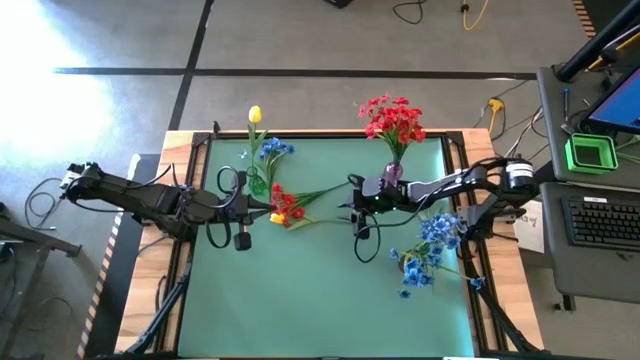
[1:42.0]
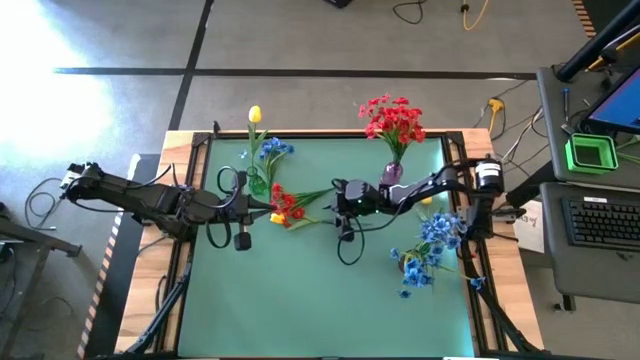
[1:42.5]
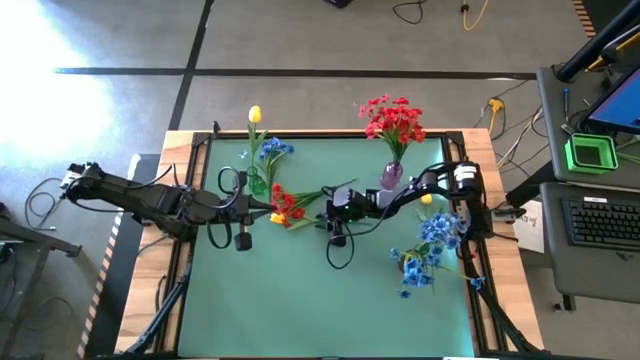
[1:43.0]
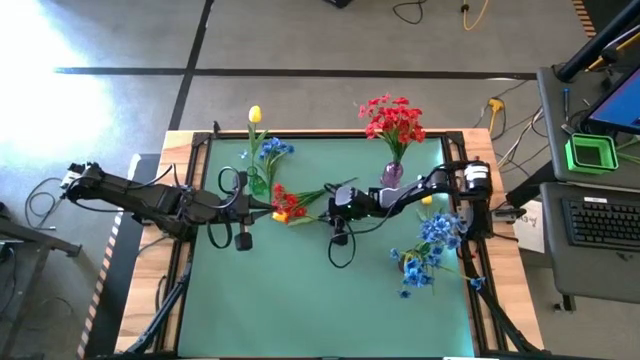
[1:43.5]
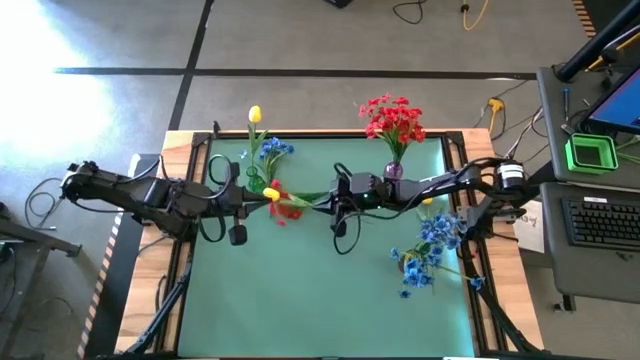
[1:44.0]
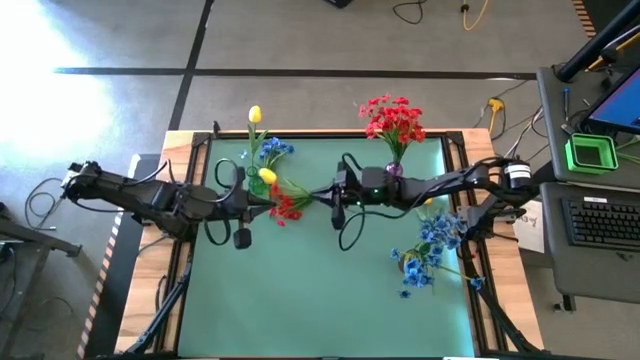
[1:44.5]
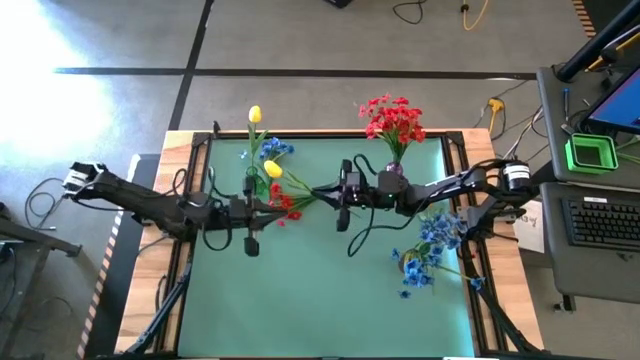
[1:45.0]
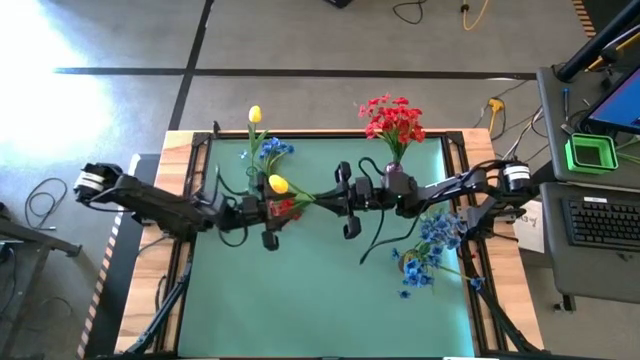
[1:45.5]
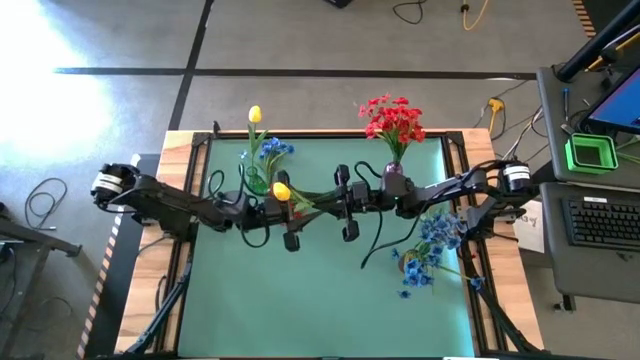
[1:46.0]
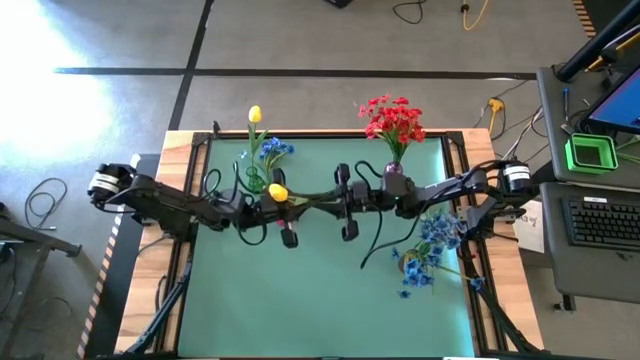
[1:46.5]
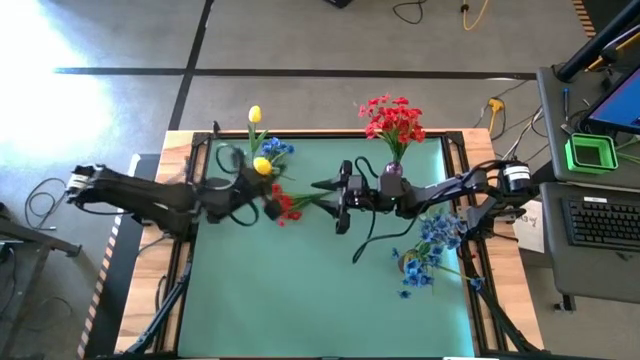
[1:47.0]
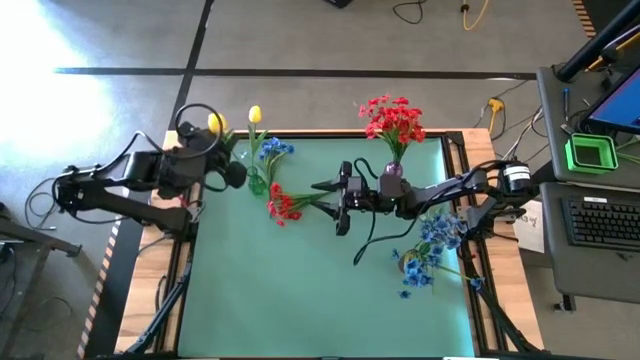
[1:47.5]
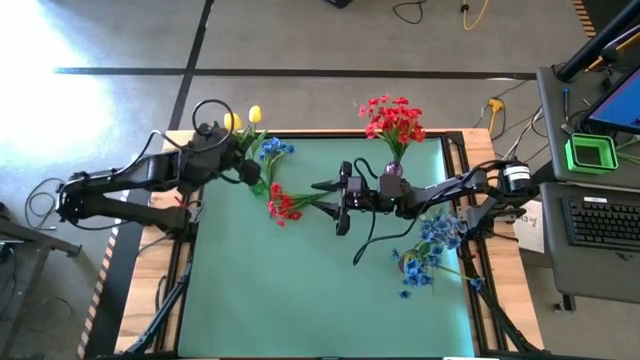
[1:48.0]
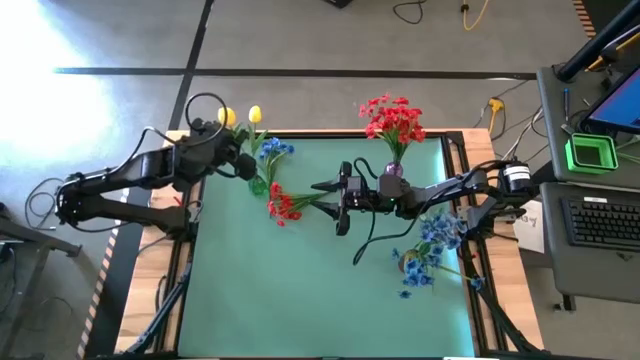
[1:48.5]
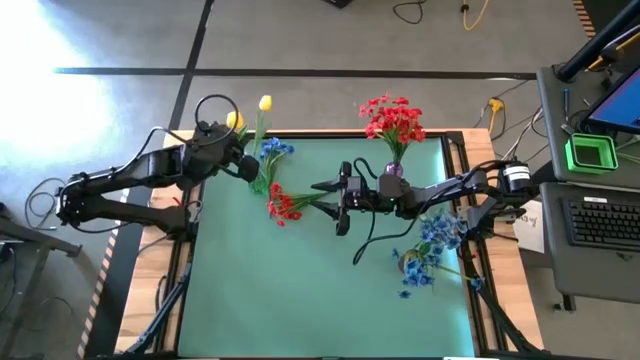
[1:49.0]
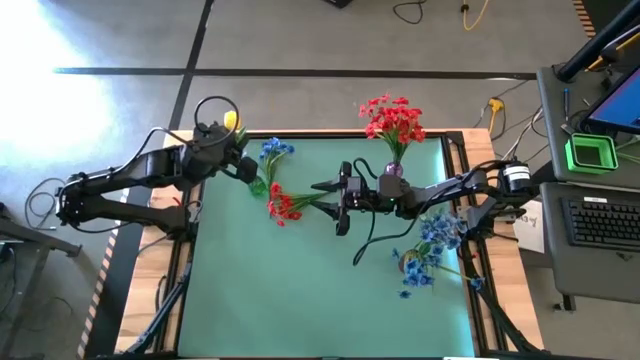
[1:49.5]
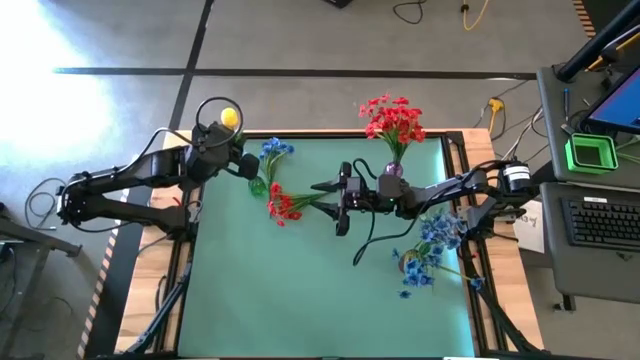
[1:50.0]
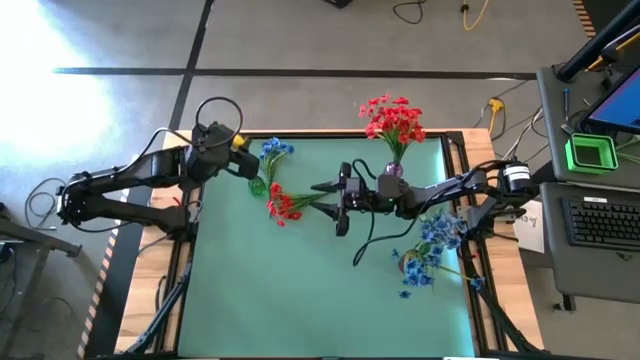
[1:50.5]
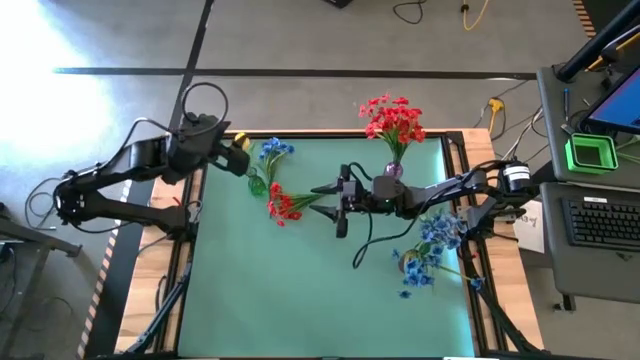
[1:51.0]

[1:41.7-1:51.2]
Task: Sort flowers into vase by color
Put the left yellow tulip into the green vase

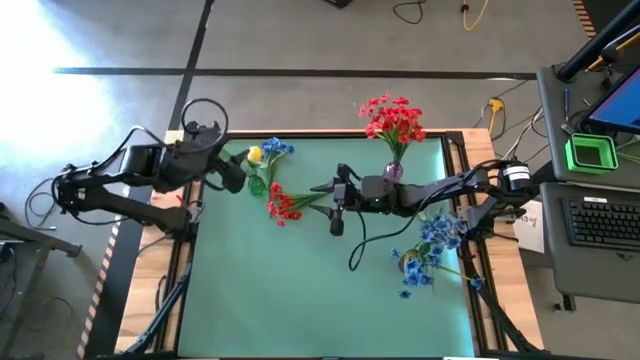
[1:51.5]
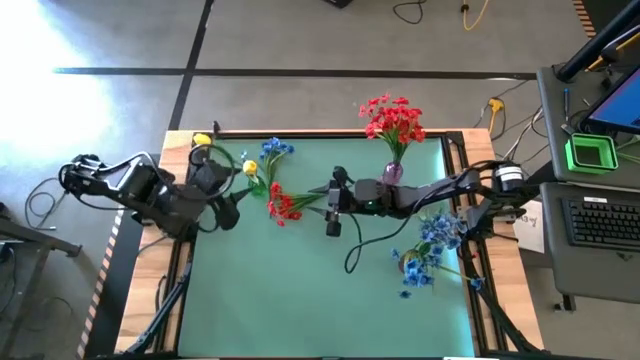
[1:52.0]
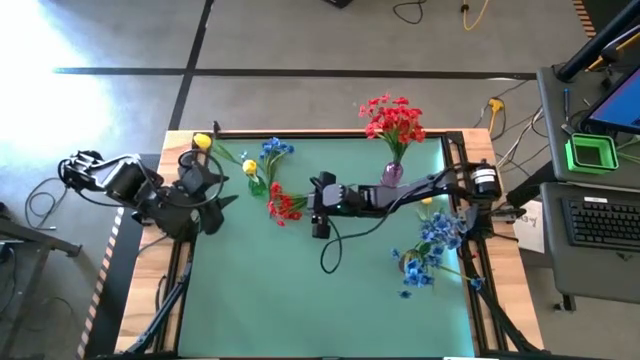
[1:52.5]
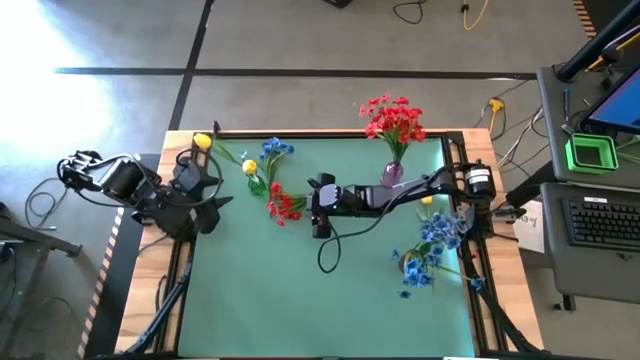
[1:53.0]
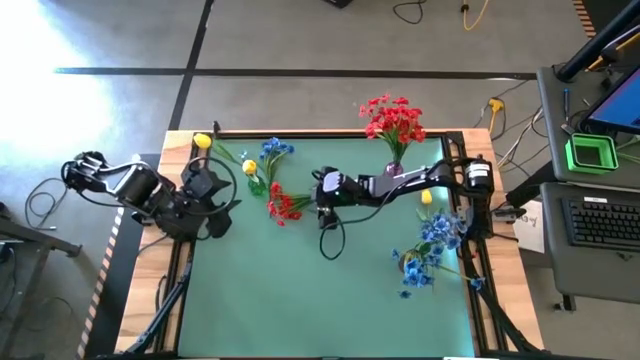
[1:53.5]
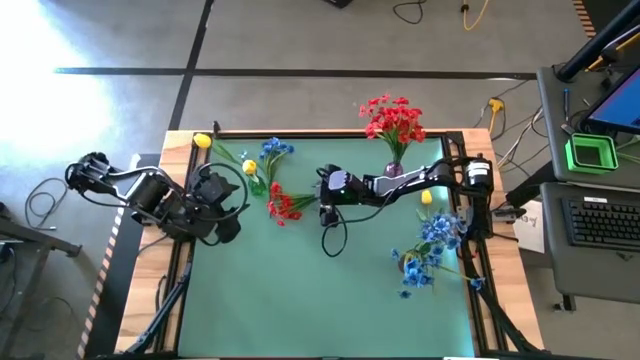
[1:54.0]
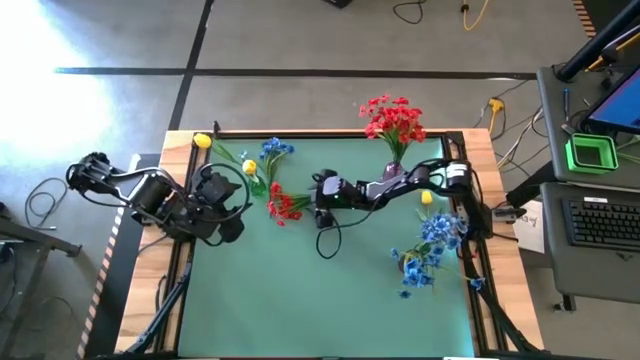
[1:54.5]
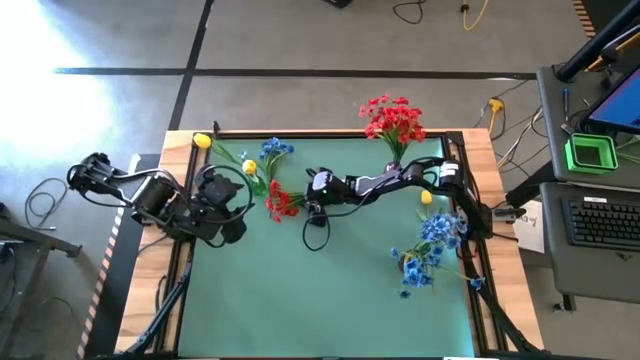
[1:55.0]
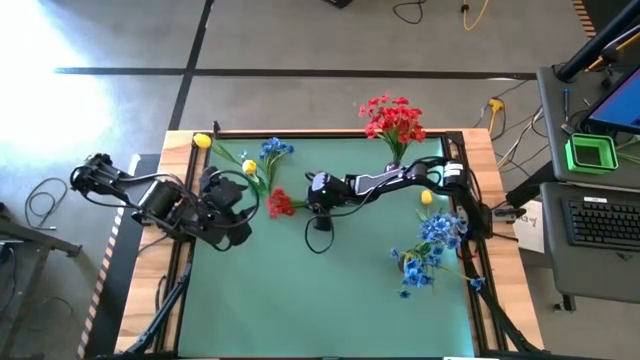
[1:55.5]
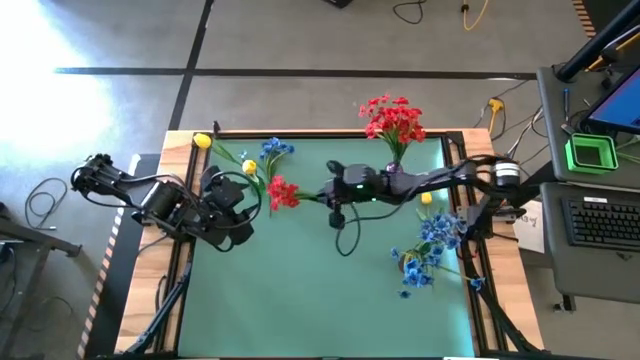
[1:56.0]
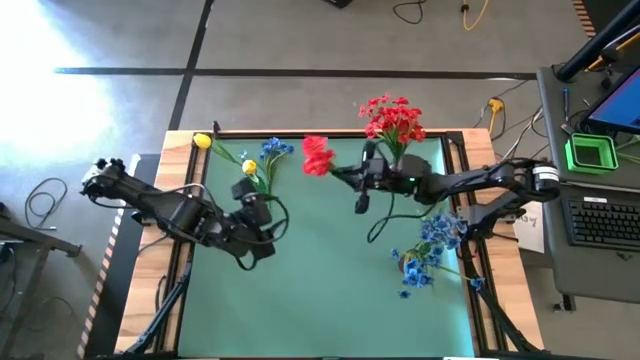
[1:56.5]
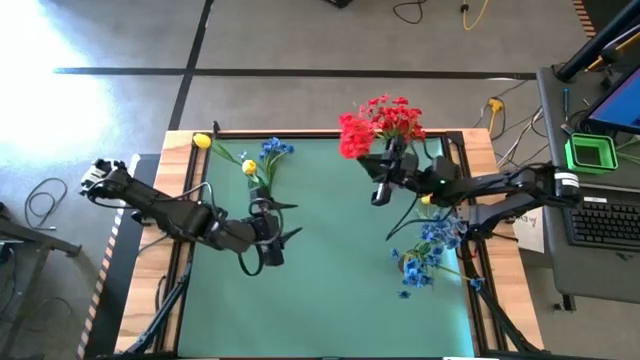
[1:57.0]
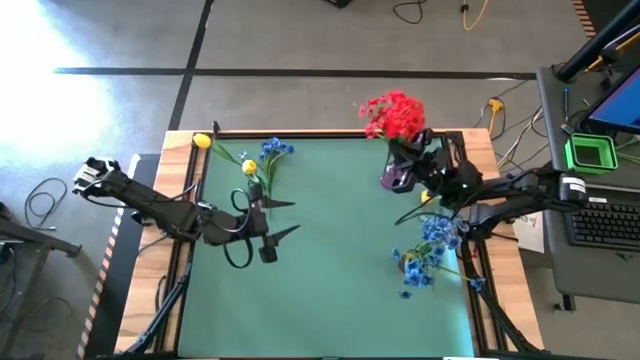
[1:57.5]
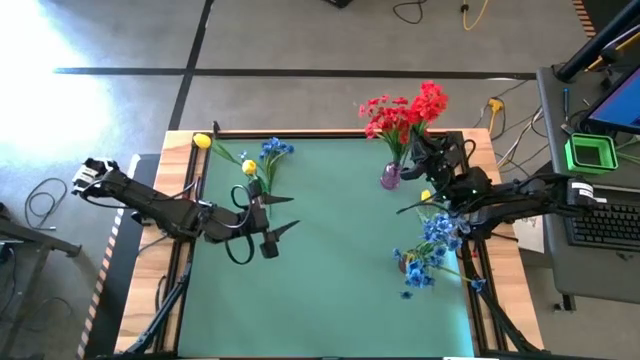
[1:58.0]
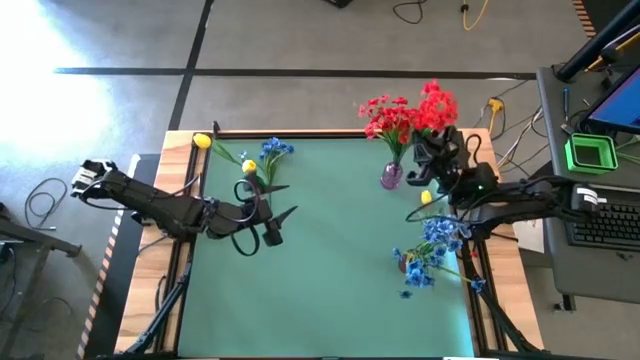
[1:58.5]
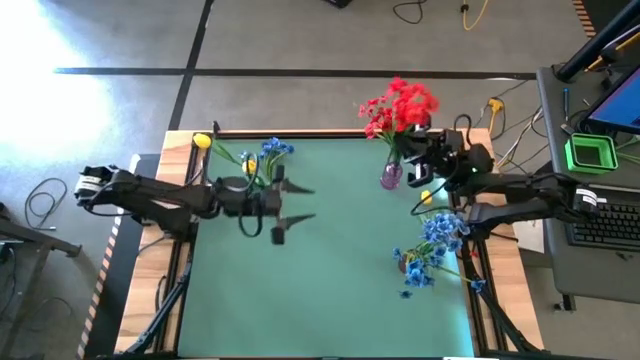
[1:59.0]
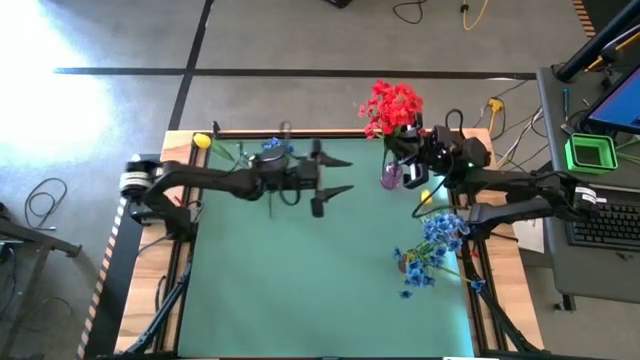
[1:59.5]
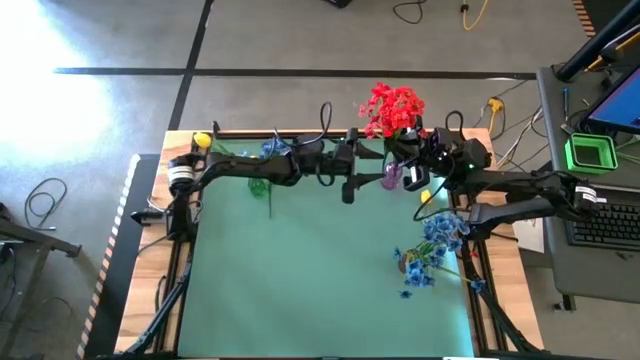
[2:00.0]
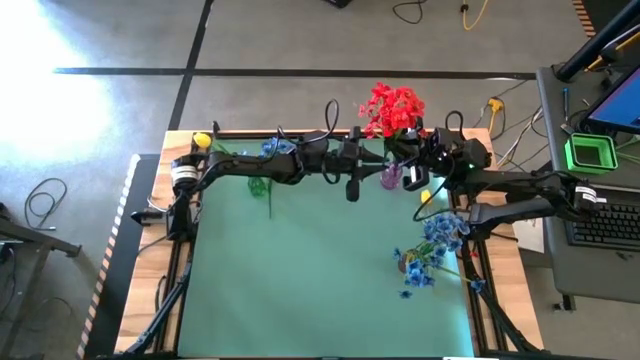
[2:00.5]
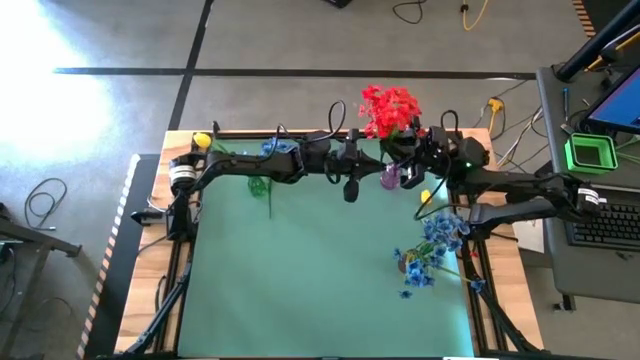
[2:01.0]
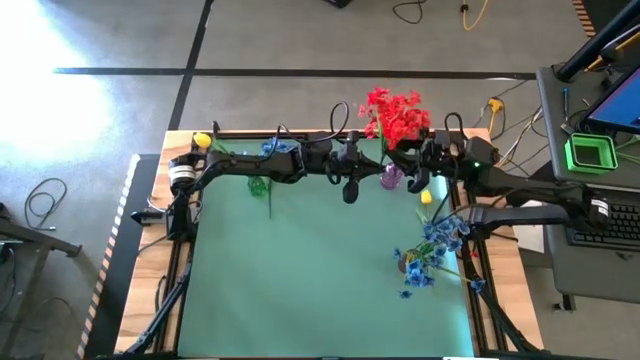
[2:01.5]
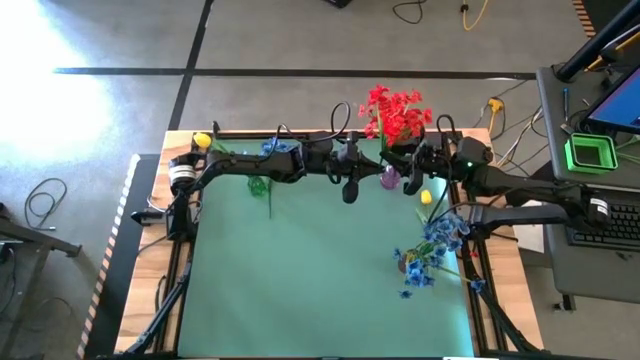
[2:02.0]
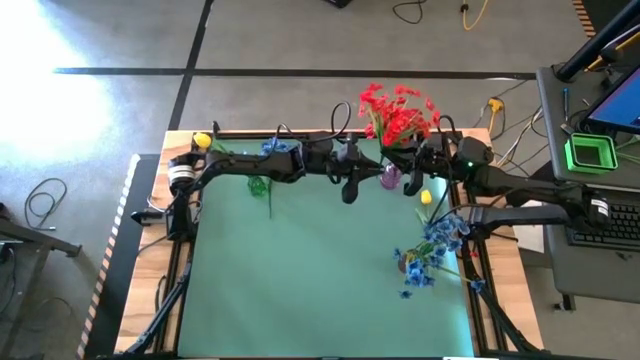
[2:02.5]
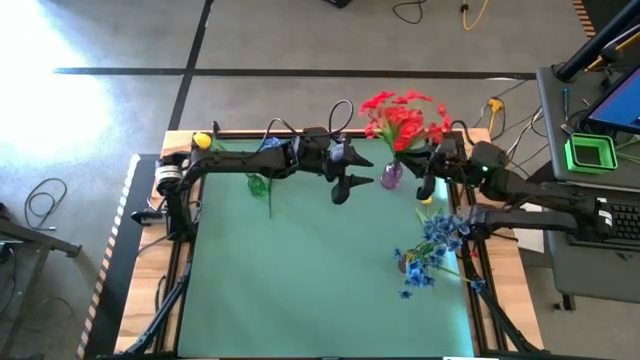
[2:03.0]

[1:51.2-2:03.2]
Put the red flower into the purple vase

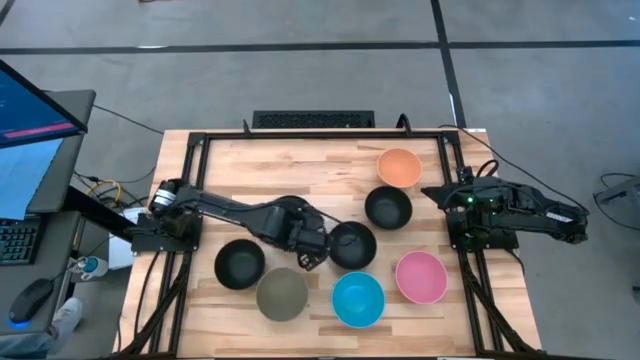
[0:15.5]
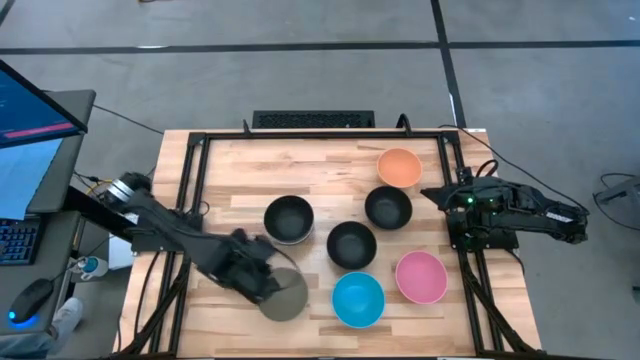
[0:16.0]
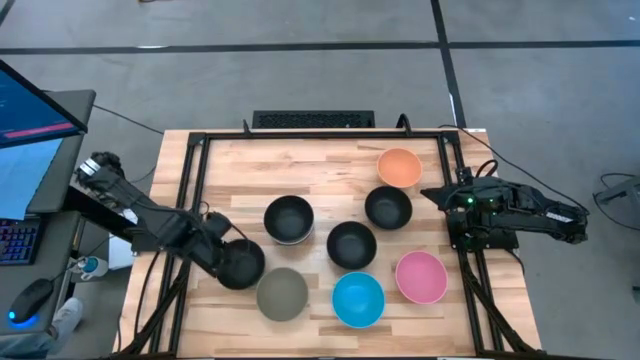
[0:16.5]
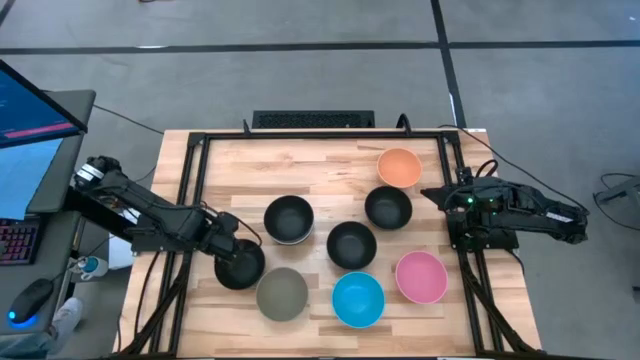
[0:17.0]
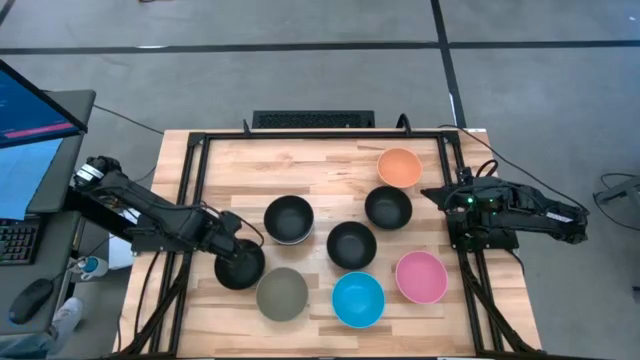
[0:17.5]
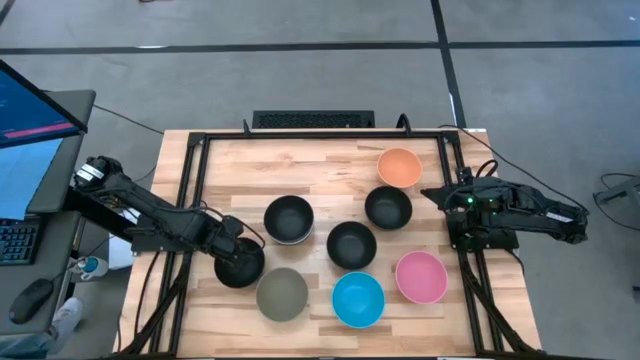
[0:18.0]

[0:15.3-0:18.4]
Task: Nest bowls inside each other
Stack the black bowl on top of the other black bowl
